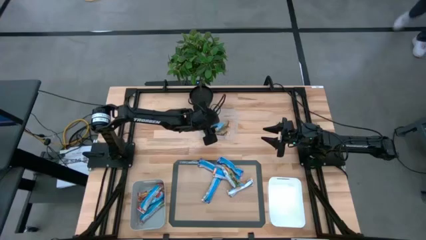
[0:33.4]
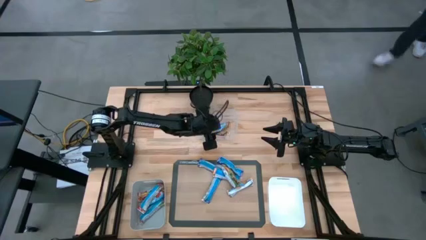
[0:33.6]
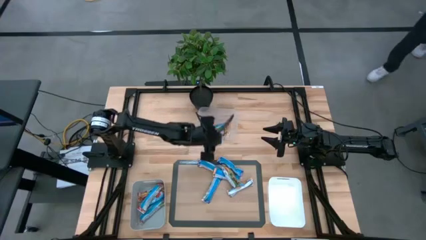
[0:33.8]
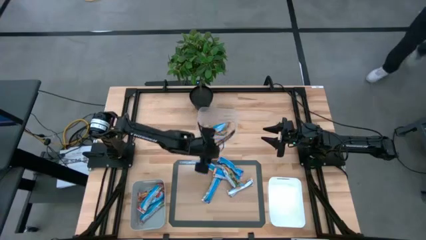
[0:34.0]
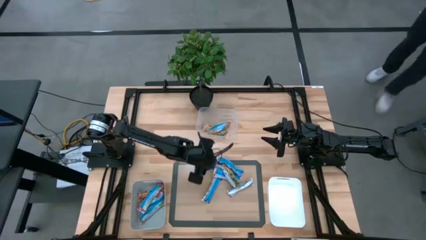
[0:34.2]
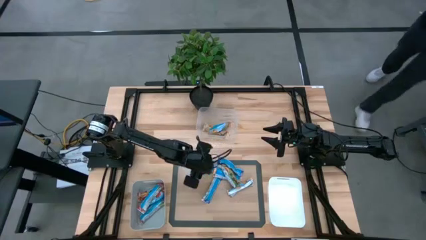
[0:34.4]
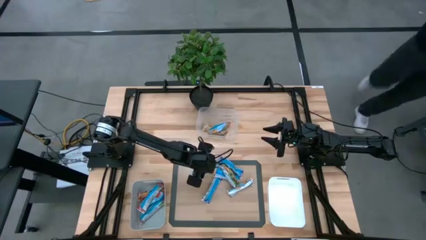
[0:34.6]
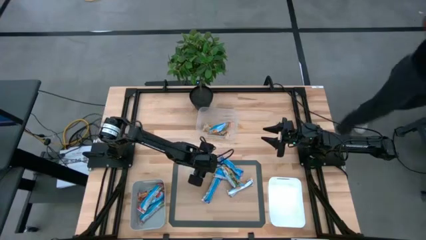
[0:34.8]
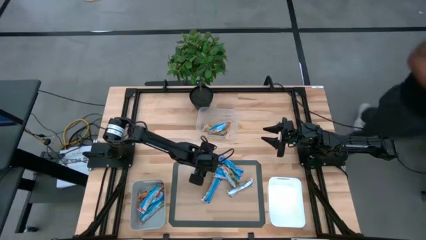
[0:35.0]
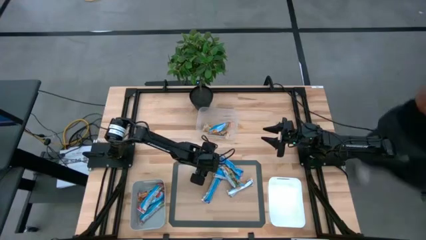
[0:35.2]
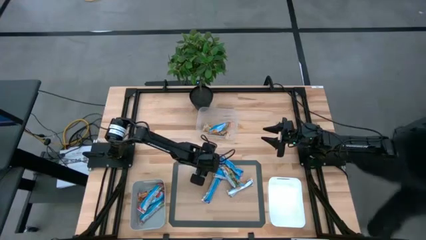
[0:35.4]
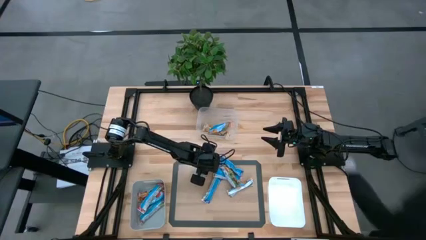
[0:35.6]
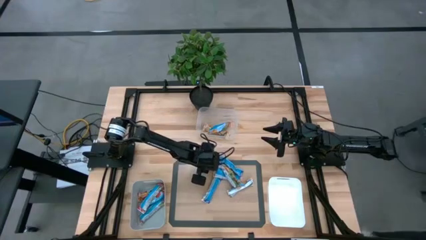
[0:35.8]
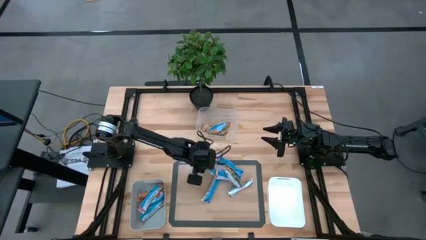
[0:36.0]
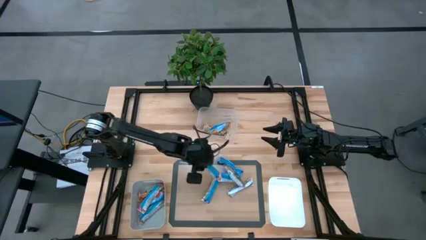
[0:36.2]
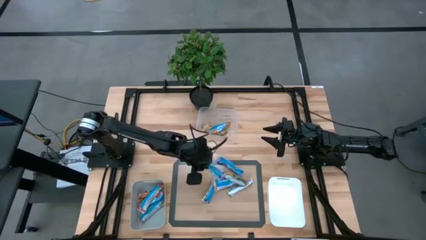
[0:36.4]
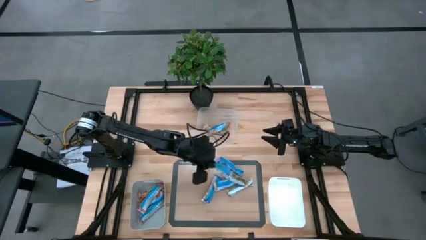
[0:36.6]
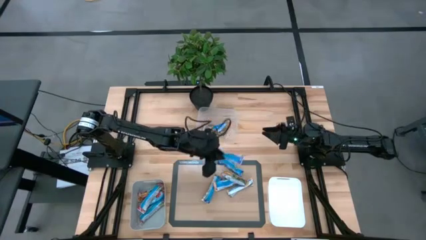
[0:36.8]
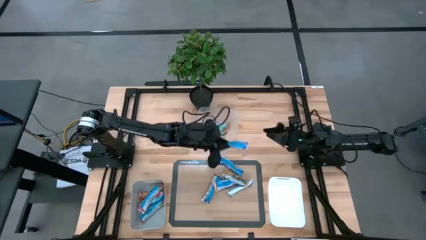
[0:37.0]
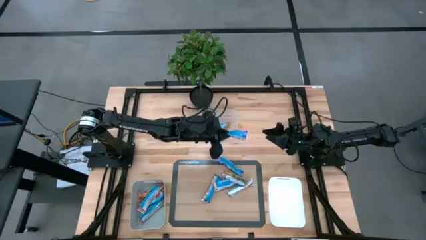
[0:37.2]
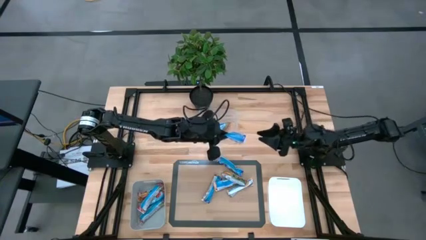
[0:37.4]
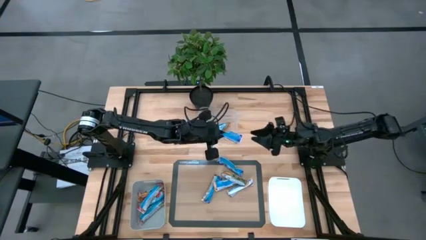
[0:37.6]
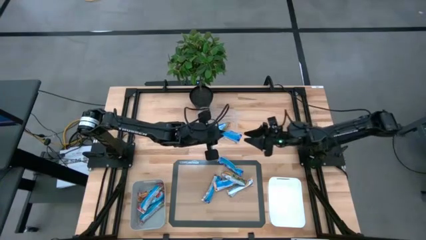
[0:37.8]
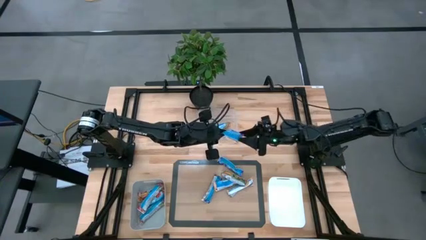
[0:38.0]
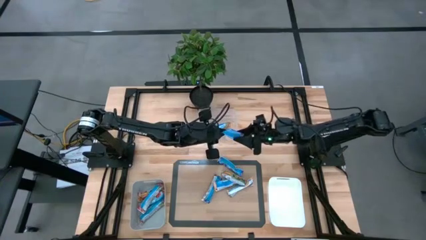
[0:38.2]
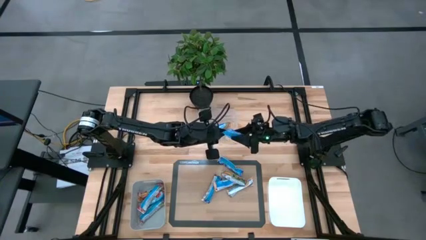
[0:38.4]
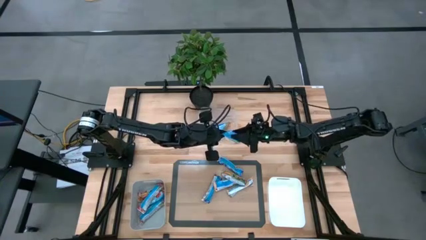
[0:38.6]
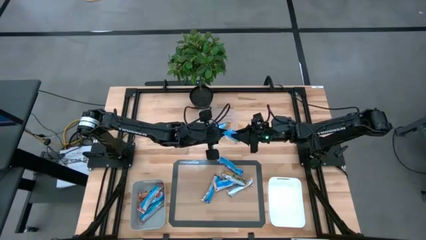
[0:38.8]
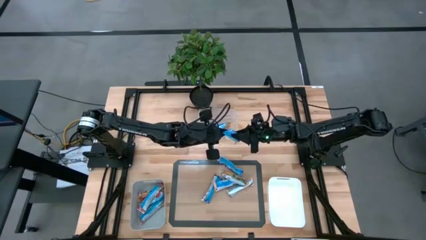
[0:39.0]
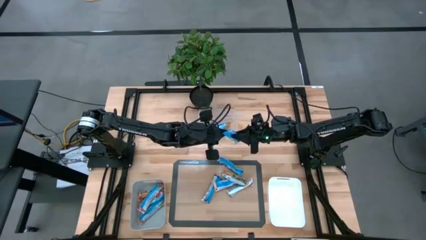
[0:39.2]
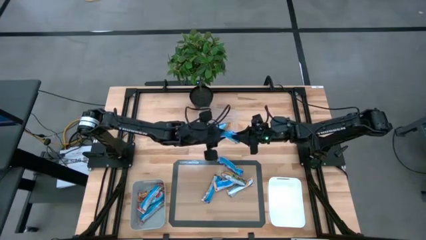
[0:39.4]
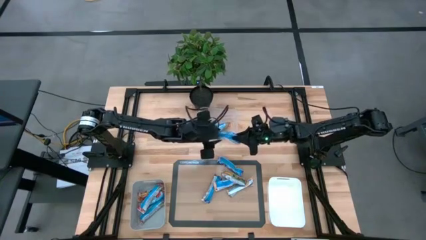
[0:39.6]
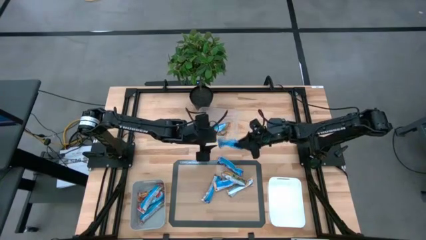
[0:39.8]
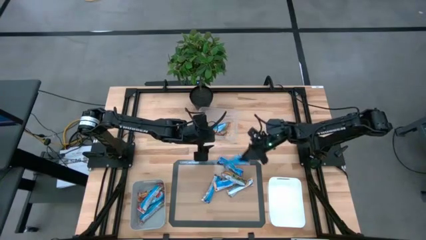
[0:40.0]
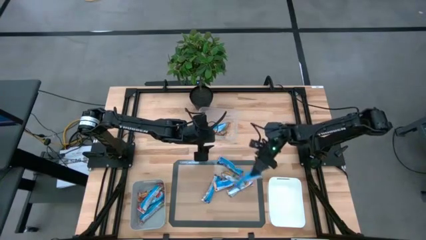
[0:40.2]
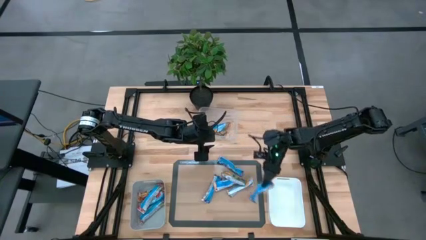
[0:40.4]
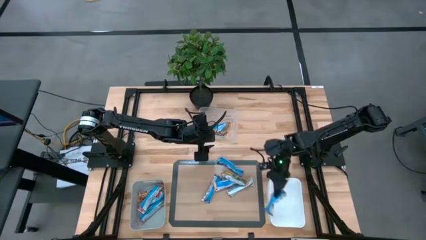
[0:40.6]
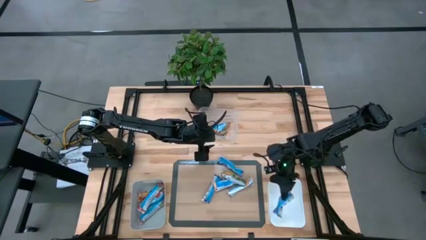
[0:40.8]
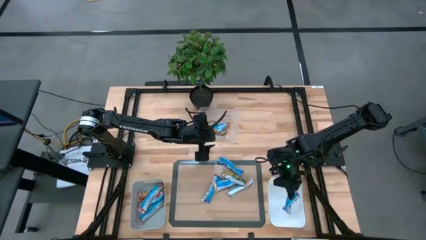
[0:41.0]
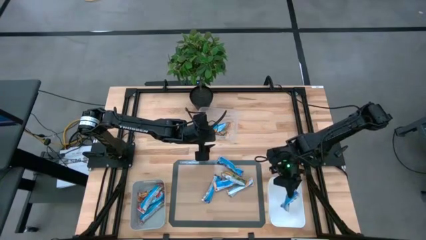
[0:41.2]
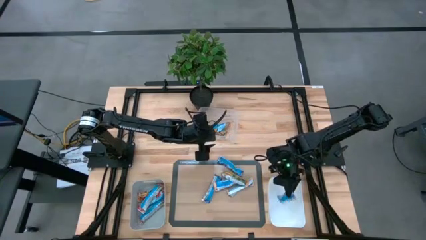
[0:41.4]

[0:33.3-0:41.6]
Task: Pick and place Granola Bars by type
Put the violet granola bar into the white bin

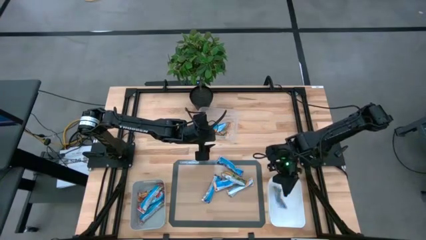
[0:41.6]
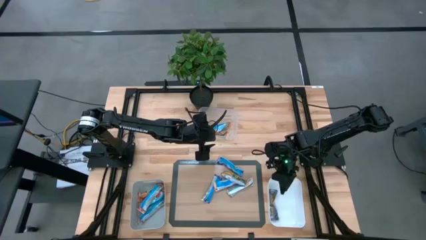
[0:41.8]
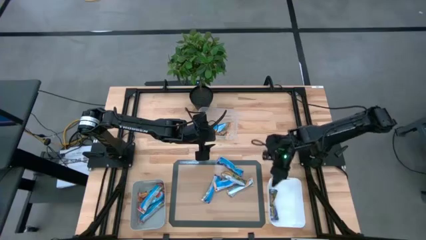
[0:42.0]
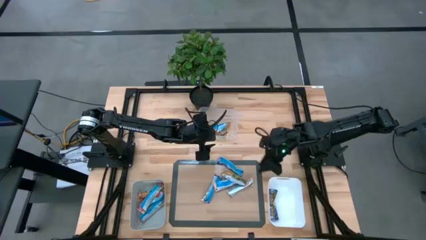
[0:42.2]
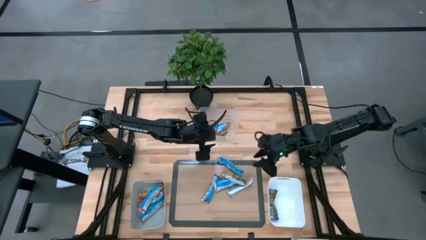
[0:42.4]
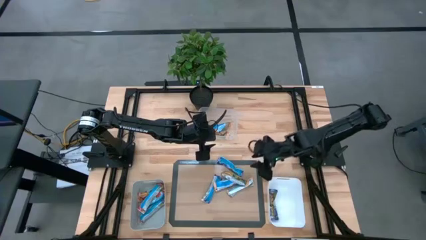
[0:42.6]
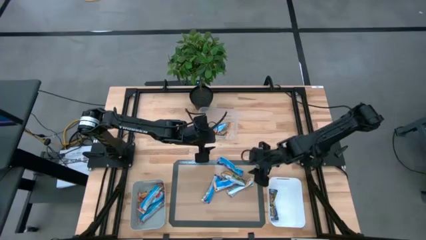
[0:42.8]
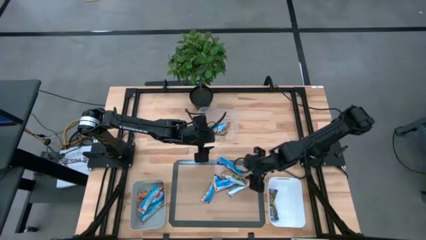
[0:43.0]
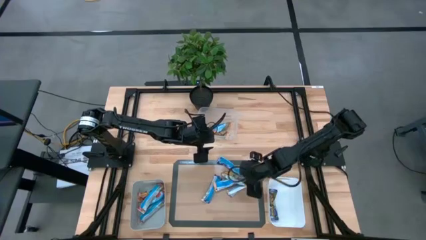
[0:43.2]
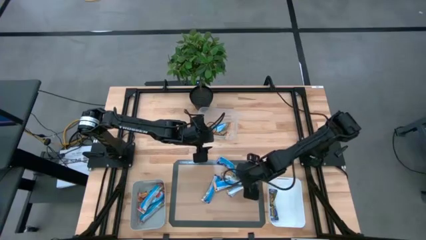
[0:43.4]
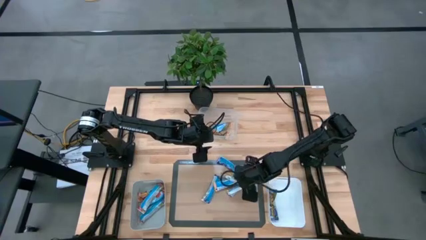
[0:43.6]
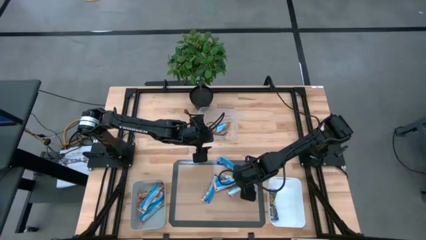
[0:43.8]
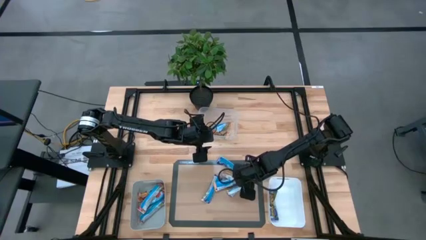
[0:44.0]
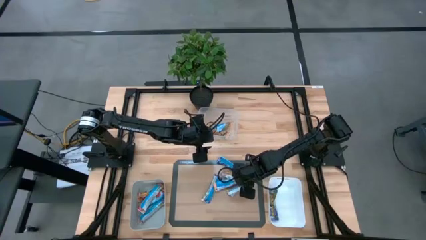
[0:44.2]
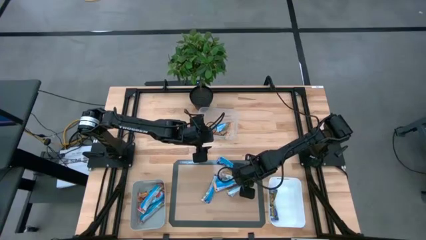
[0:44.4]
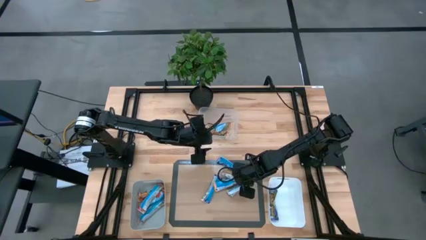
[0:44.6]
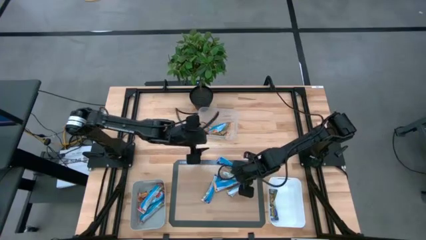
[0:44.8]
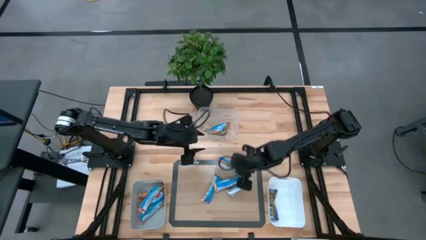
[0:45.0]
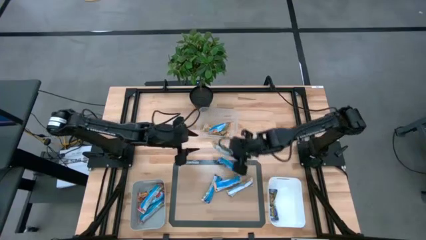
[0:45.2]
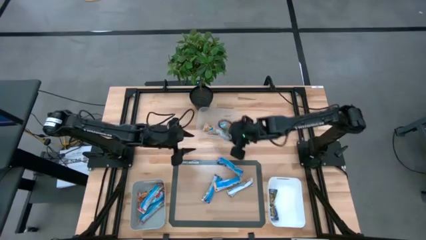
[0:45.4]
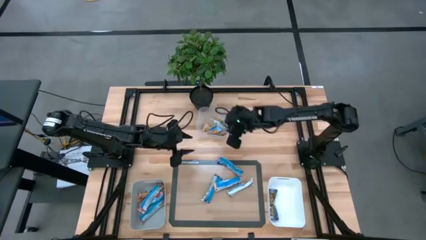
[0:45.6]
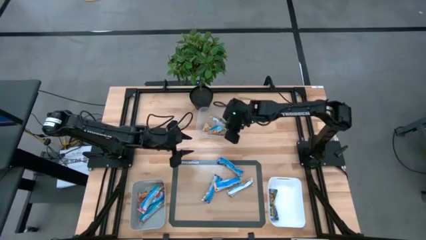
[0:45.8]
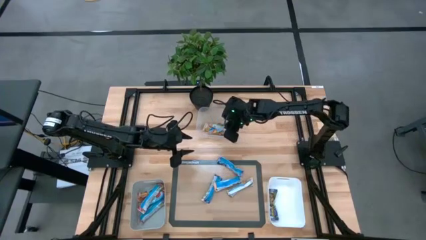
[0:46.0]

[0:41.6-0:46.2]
Put the orange granola bar into the transparent bin

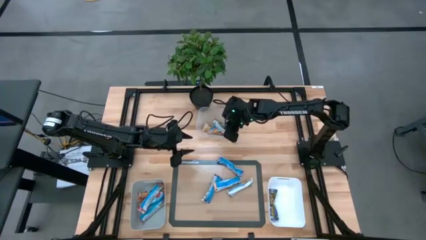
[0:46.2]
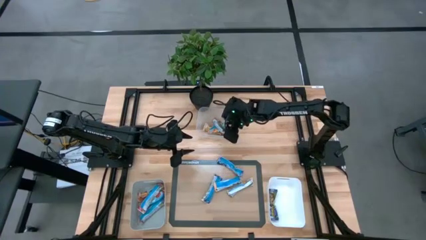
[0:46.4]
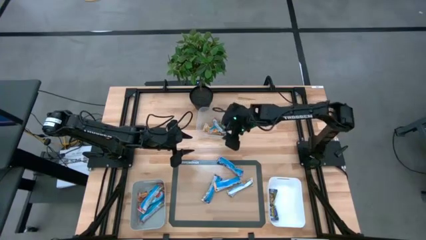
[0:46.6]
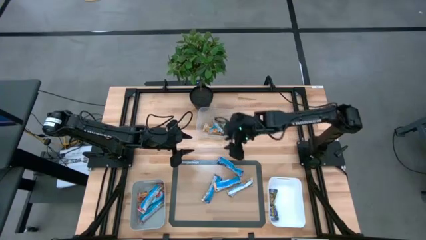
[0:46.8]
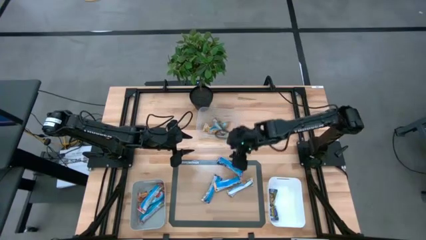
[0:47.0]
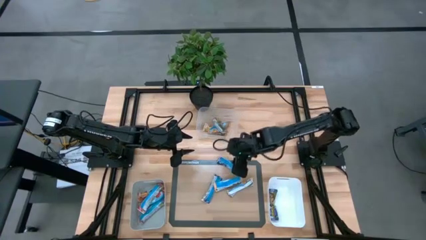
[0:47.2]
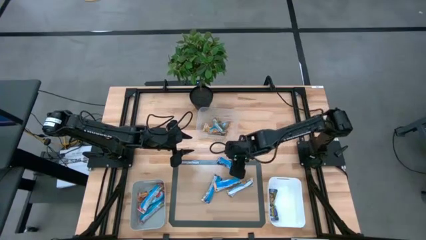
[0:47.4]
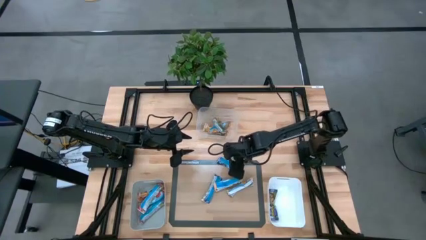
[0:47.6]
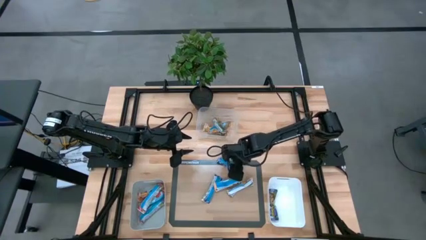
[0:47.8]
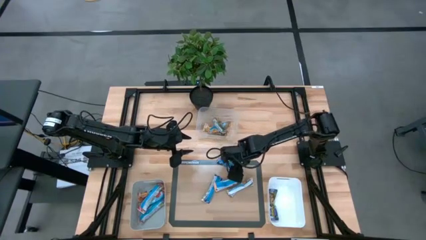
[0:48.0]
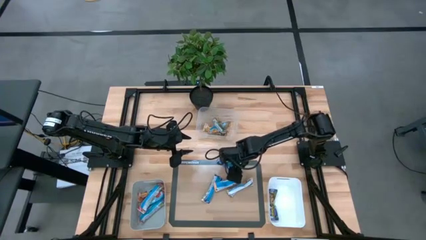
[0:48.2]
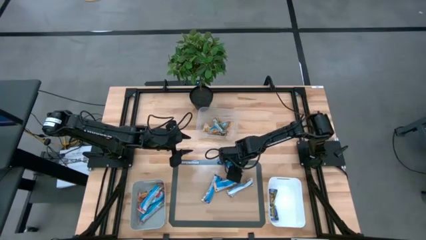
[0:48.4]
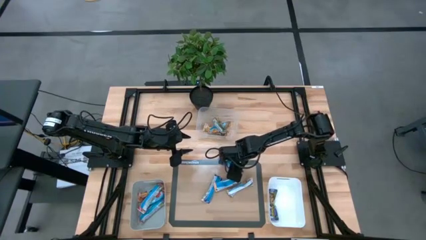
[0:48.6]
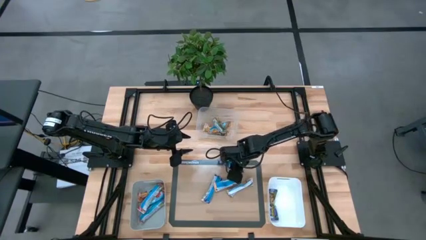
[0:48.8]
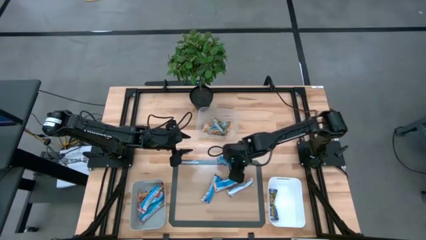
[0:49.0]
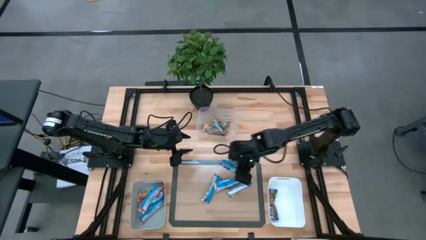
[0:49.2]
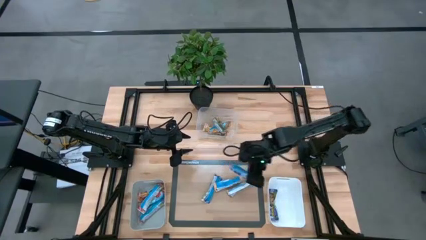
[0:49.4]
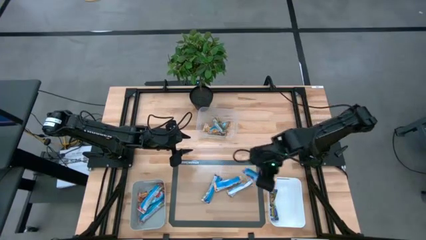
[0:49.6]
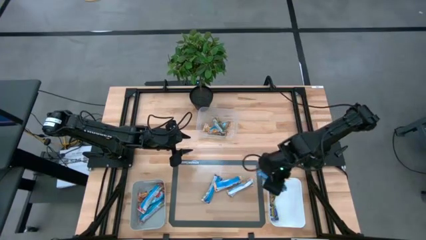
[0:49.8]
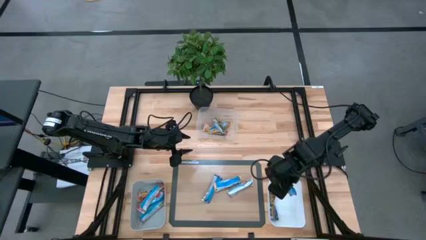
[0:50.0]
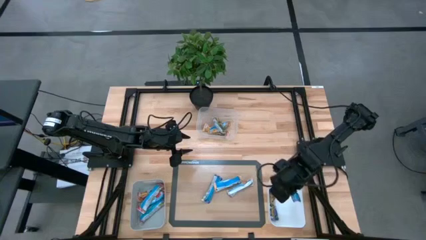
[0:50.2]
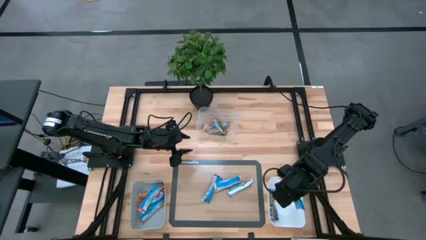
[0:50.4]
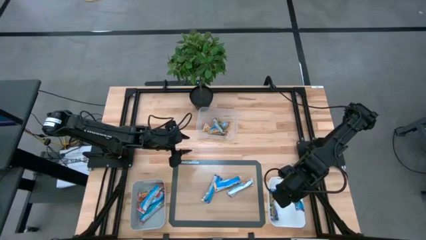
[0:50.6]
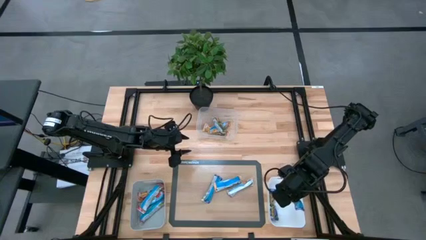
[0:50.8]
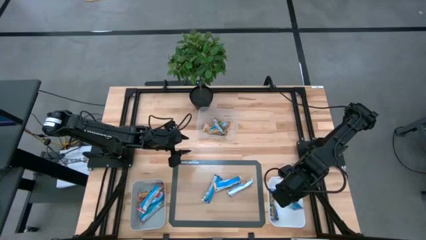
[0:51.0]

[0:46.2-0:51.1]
Put the violet granola bar into the white bin
